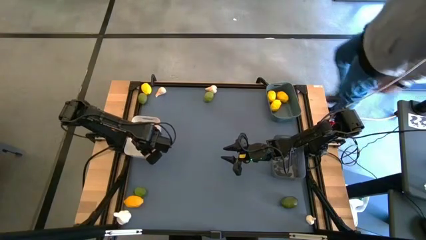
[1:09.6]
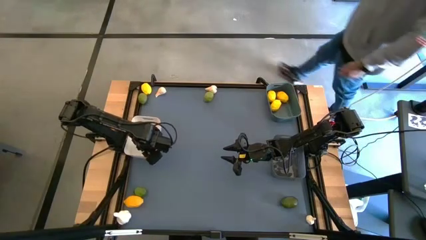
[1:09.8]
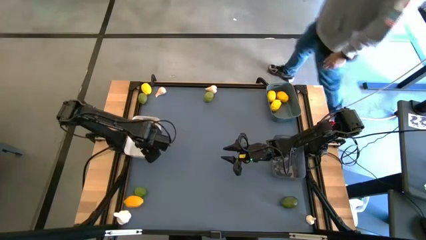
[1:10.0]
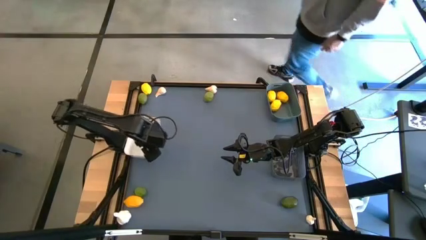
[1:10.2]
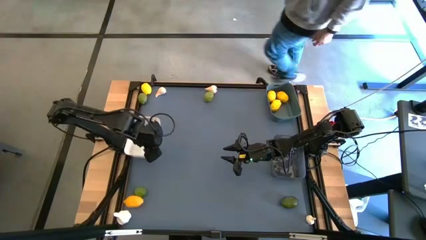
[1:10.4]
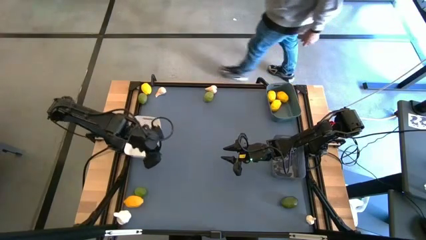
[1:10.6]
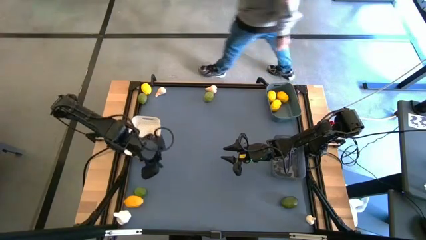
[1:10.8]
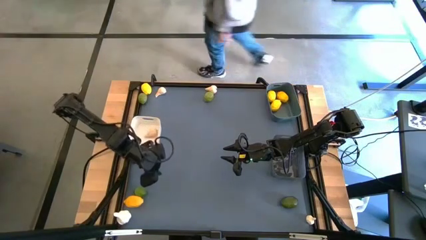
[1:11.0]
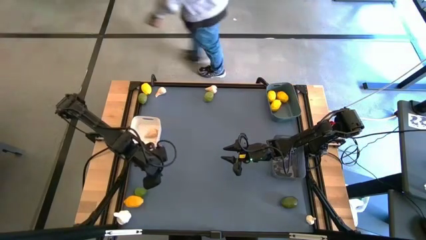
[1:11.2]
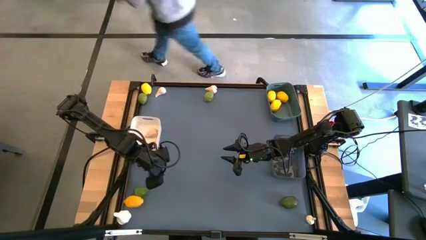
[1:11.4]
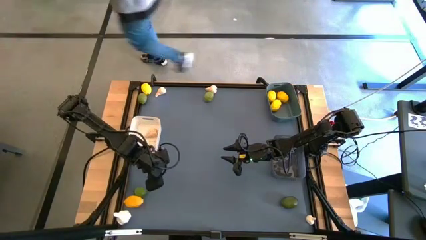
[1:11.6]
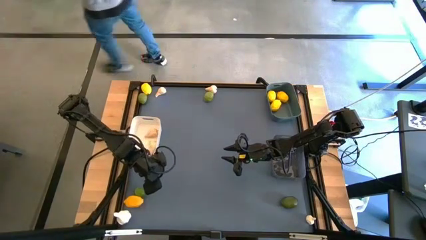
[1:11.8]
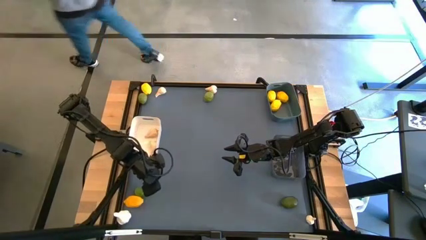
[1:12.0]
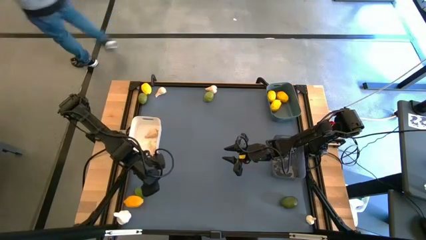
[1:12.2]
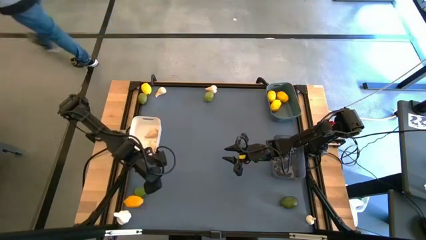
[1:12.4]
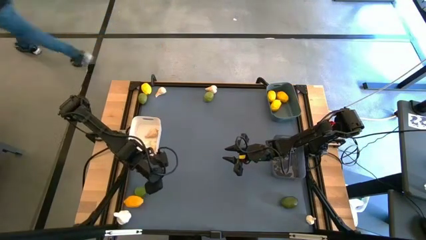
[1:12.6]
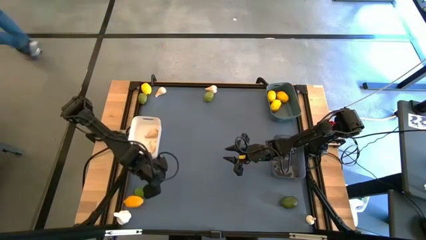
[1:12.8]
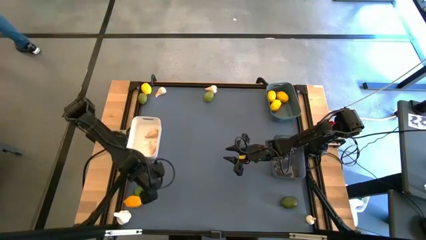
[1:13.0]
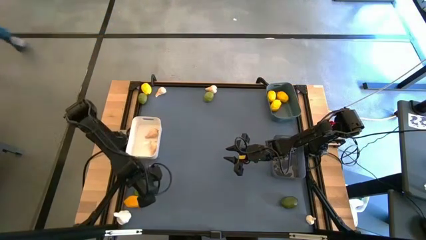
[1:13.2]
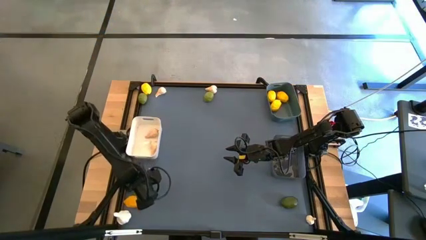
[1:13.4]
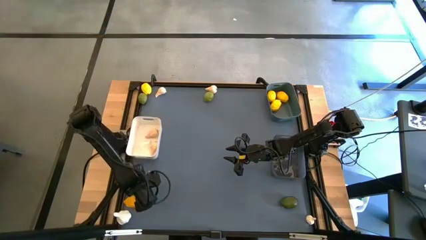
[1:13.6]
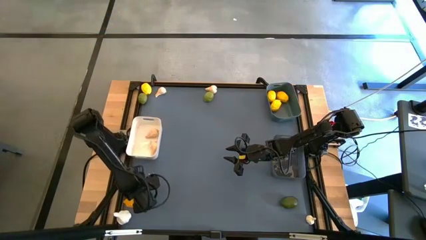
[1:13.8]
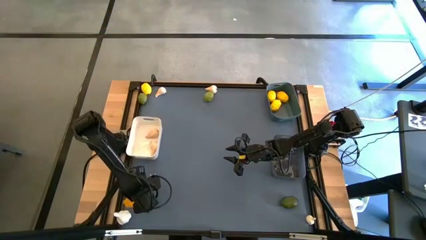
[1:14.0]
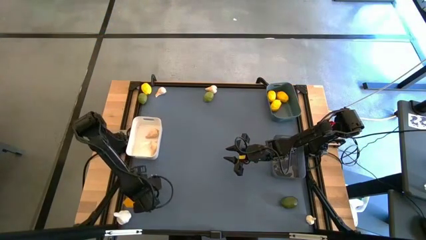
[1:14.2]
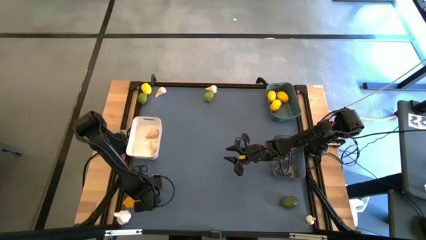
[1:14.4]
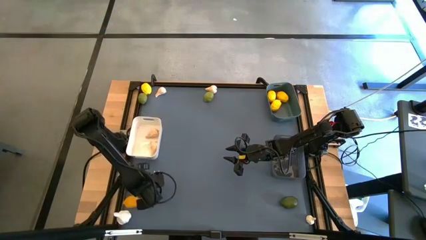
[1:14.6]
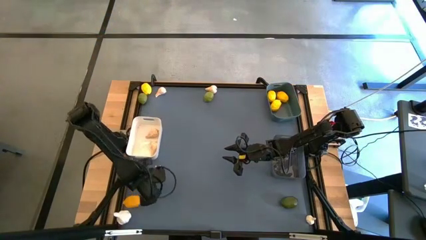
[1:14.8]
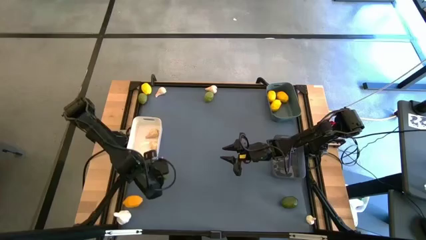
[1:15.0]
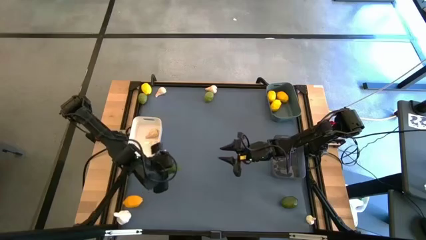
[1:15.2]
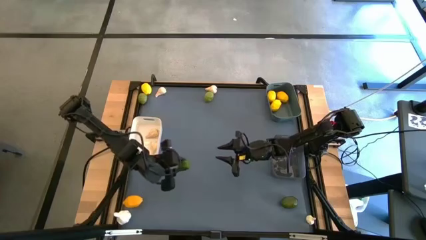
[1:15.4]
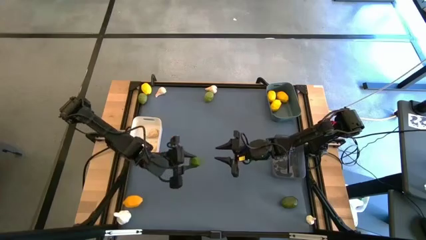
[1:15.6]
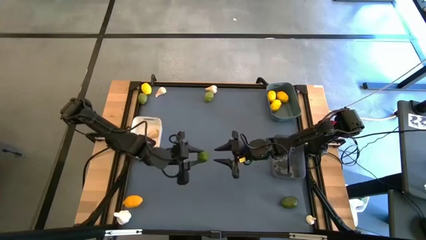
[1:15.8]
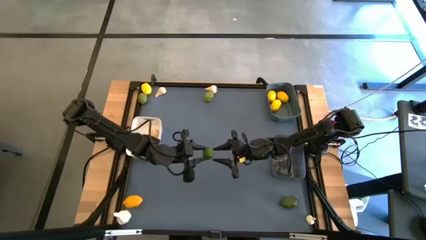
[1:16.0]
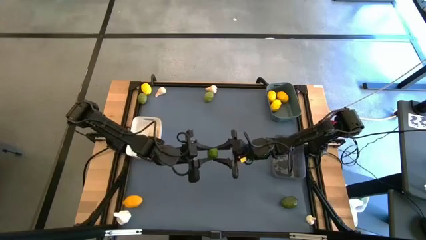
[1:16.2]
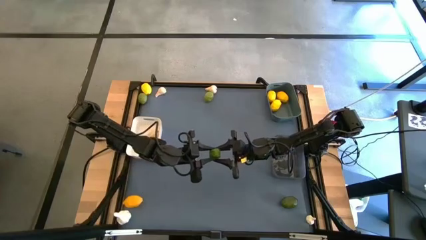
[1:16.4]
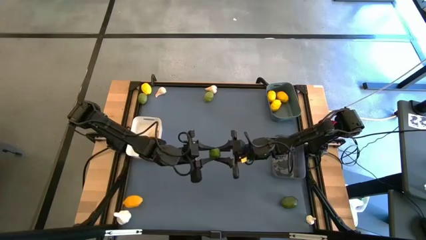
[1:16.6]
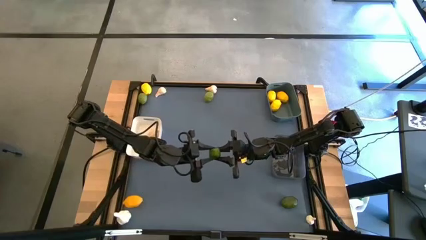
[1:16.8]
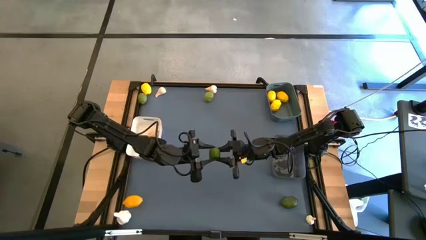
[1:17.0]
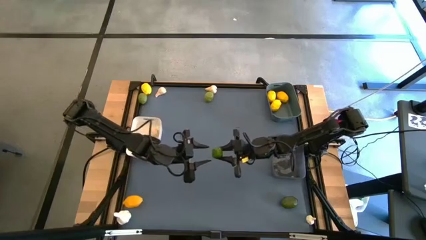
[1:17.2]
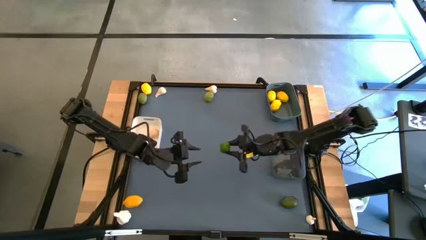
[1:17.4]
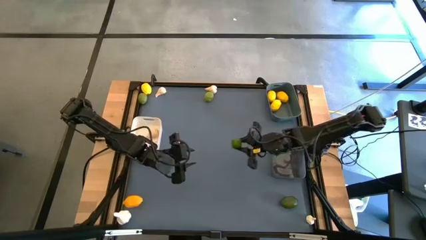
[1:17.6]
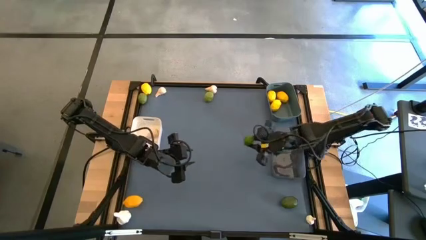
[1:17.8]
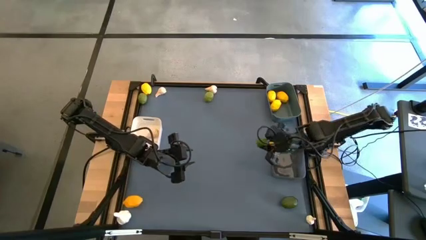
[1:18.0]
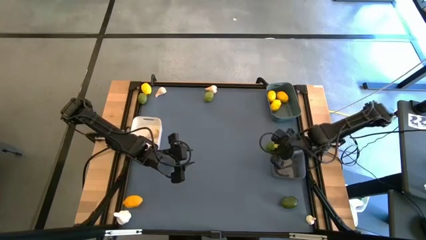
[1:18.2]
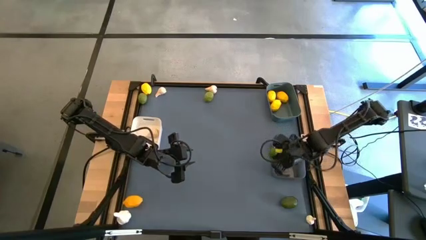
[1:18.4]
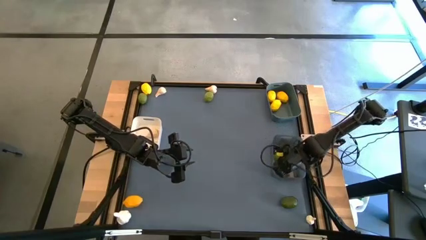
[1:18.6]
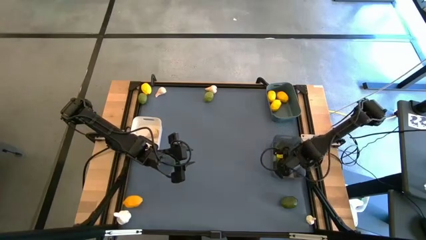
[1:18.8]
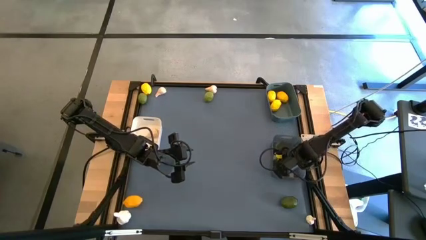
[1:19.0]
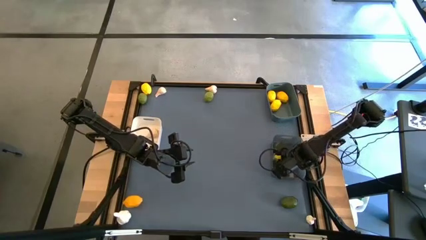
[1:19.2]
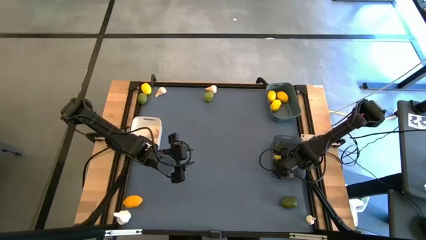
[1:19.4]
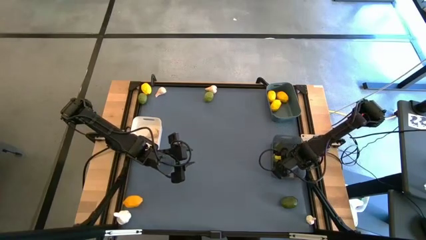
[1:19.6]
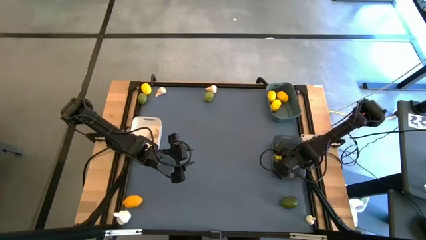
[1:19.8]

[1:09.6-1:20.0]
Task: Sort produce into baskets
Put the lime into the black bin

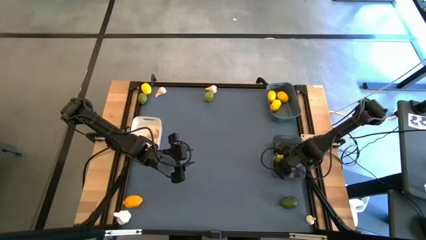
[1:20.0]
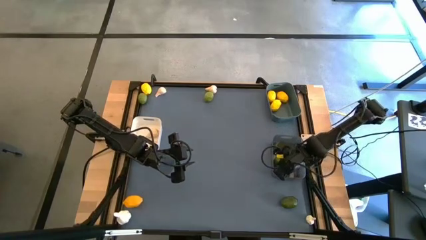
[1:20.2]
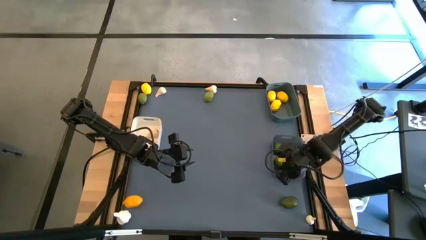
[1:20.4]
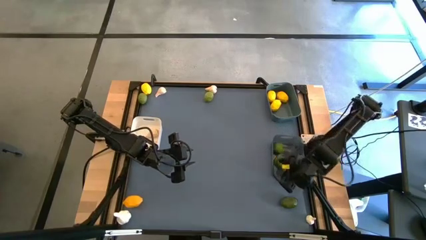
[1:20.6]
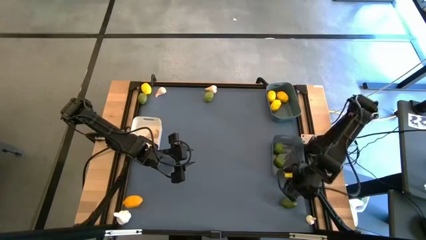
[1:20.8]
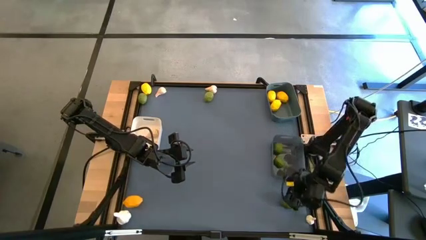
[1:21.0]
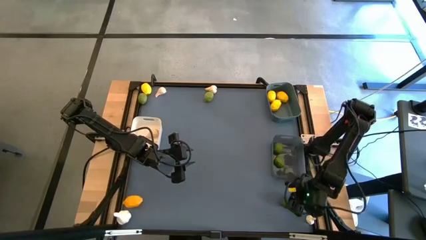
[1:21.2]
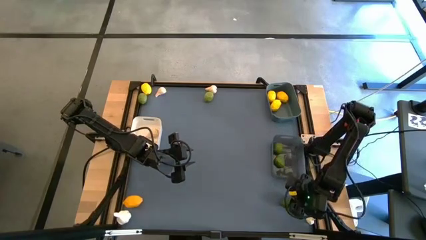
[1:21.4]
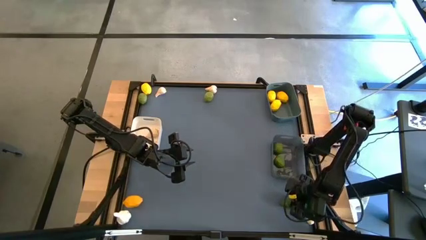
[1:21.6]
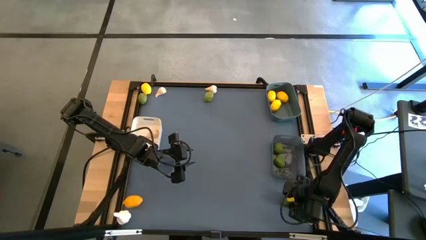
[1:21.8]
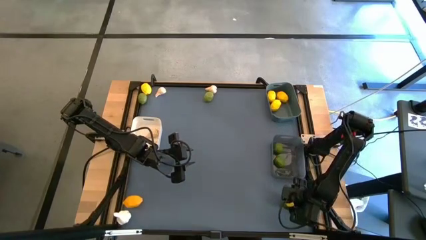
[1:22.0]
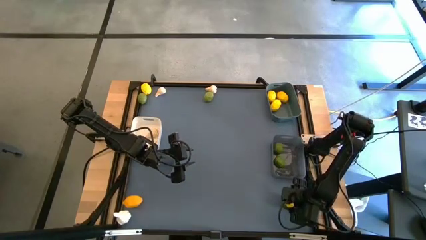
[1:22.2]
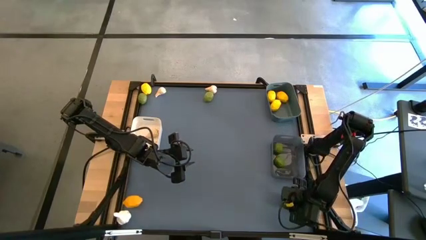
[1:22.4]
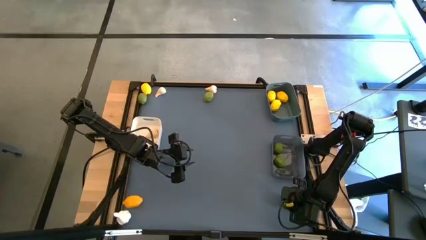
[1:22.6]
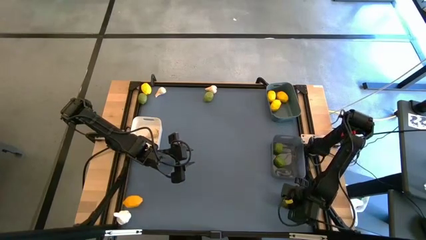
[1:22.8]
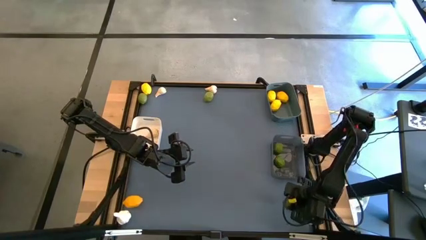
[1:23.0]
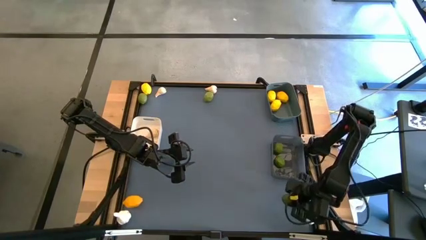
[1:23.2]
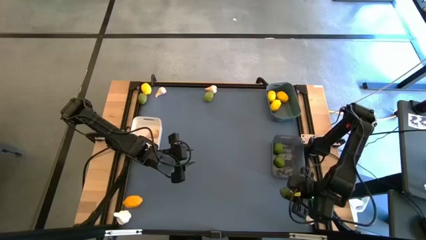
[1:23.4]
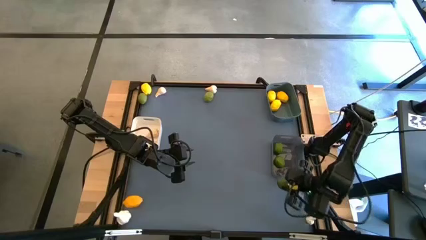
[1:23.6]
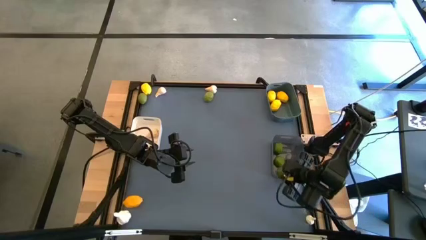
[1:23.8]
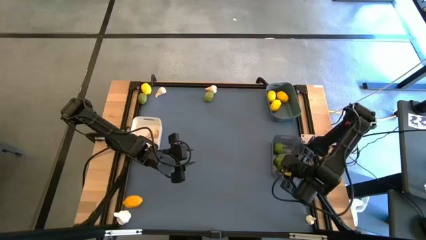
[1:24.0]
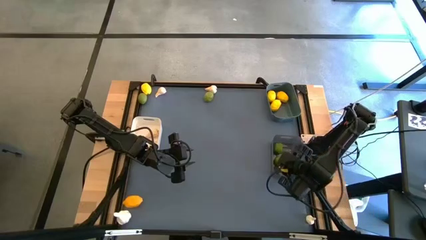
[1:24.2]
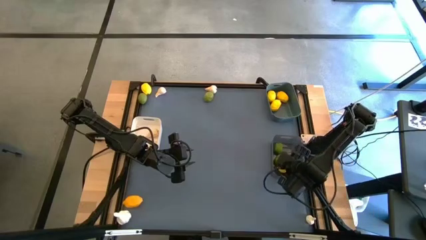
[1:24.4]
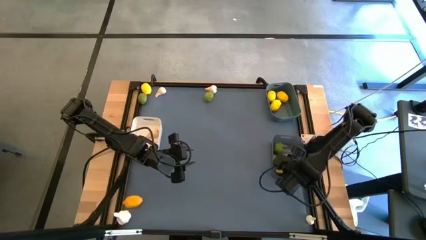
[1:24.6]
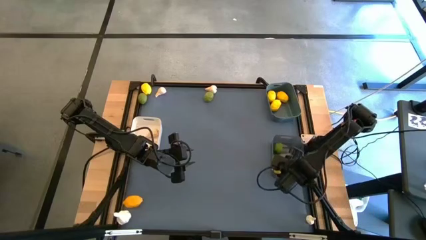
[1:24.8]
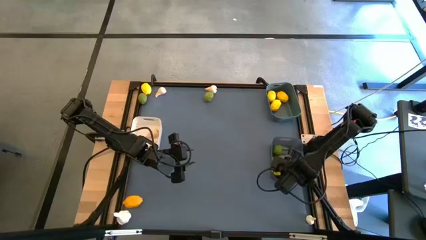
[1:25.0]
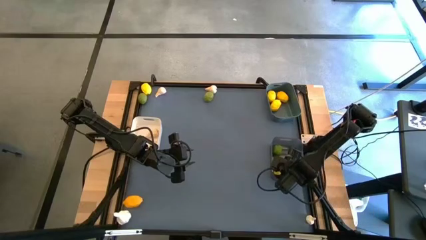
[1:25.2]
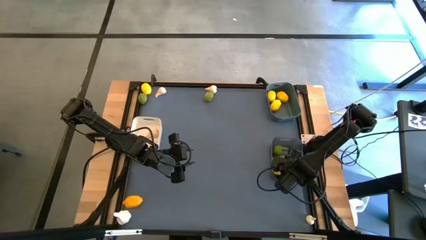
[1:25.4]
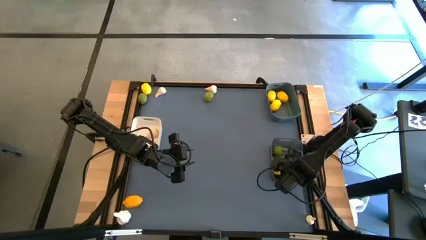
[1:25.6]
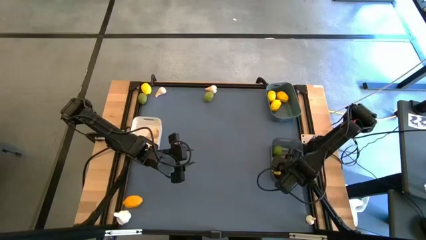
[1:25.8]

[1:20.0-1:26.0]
Put the lime into the black bin
